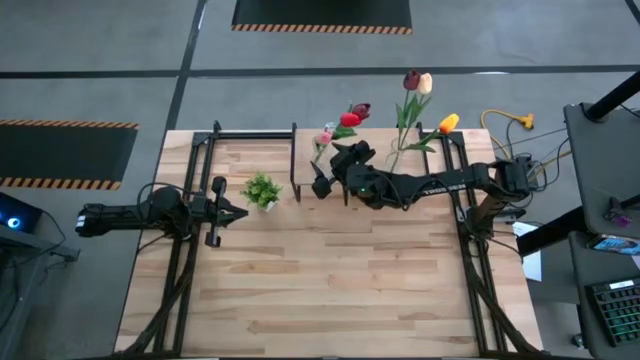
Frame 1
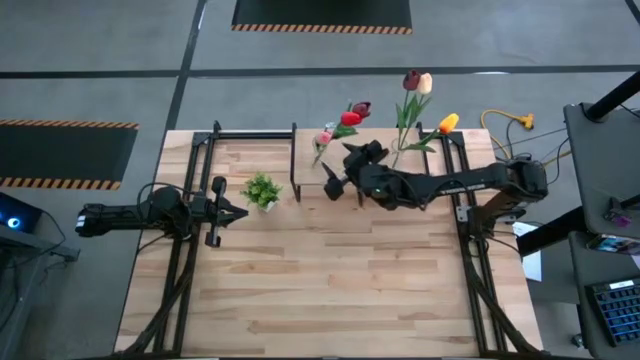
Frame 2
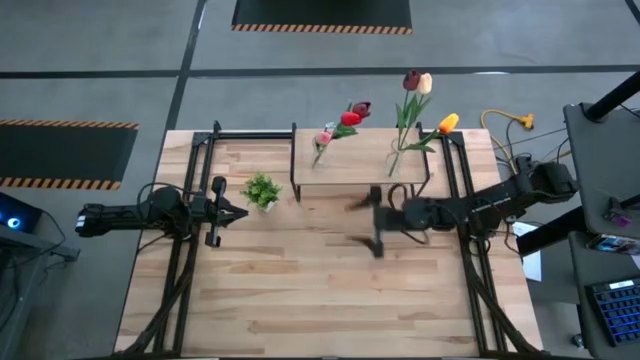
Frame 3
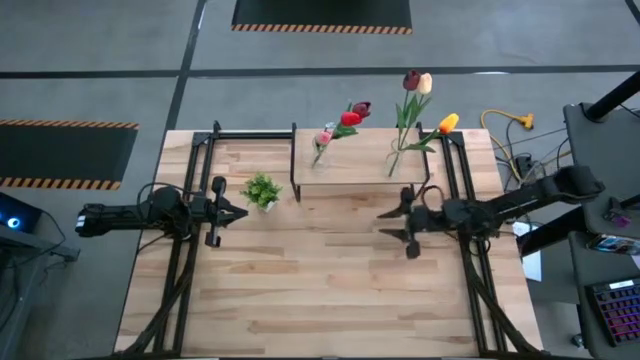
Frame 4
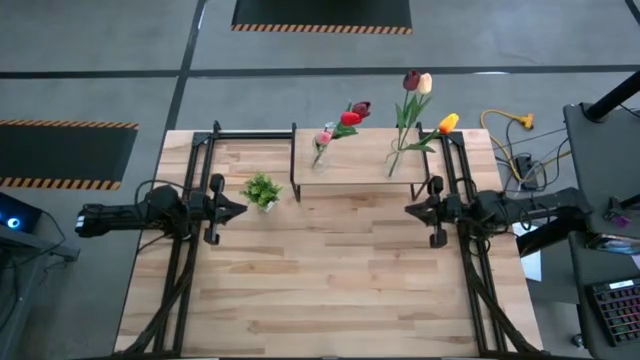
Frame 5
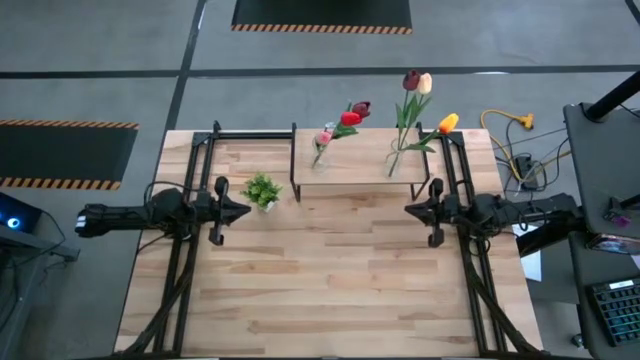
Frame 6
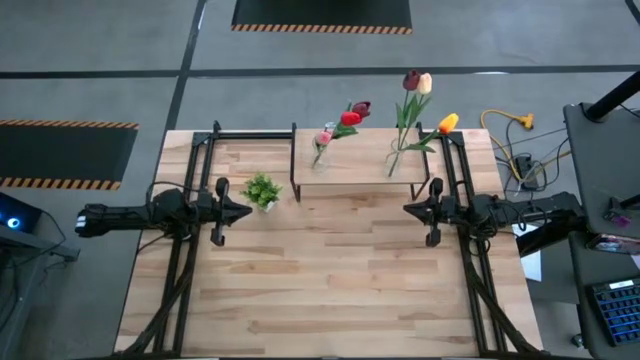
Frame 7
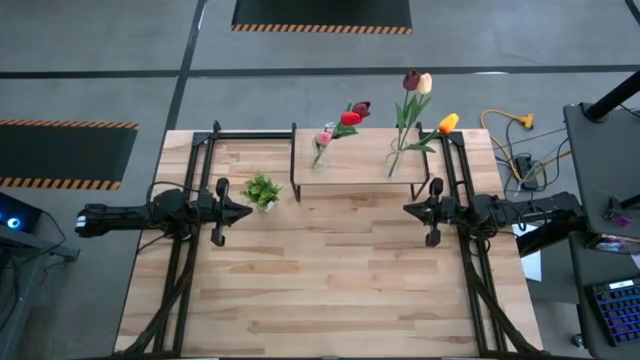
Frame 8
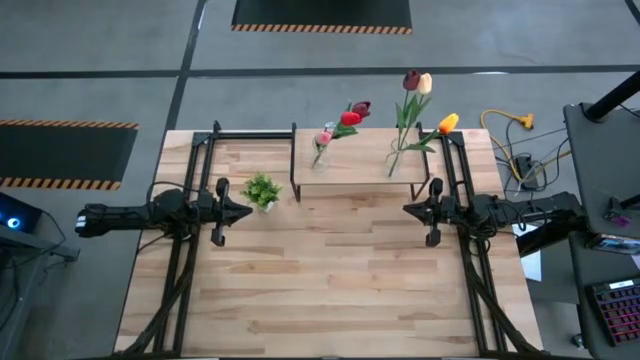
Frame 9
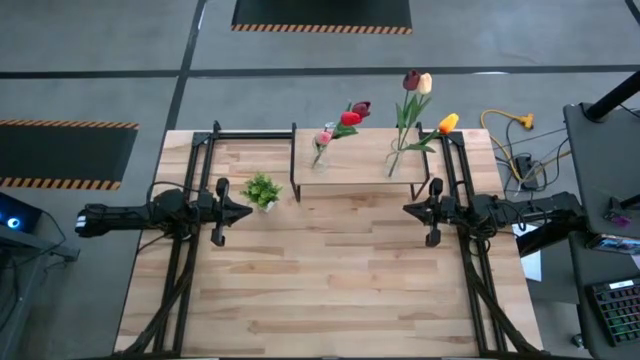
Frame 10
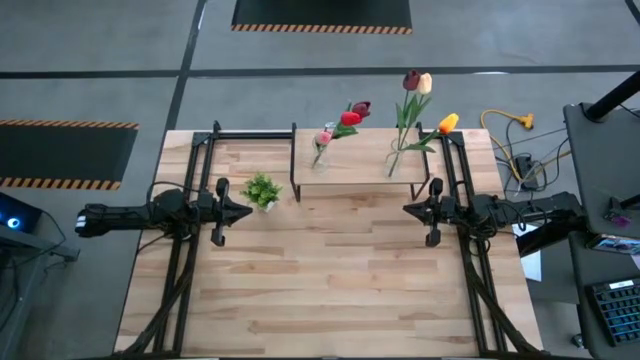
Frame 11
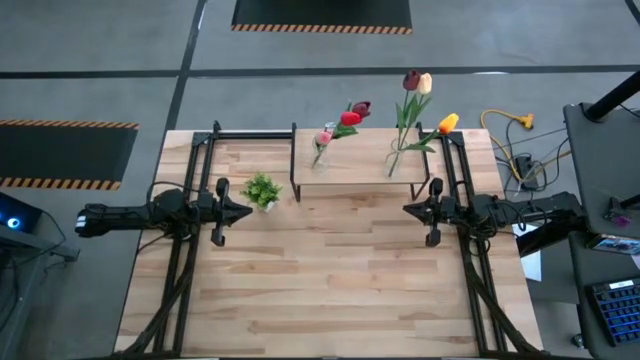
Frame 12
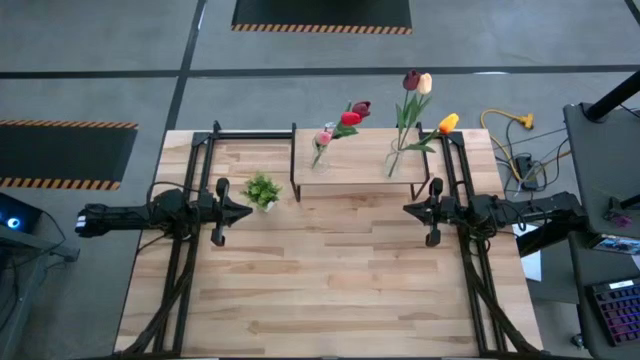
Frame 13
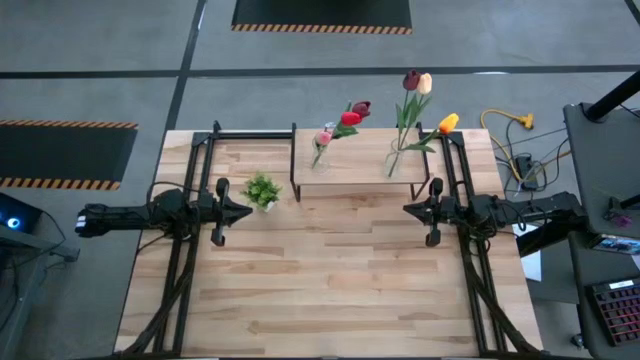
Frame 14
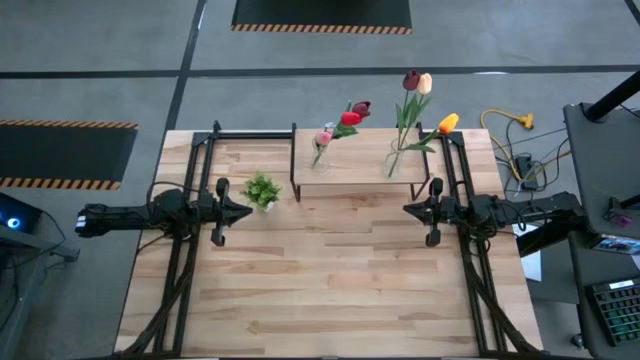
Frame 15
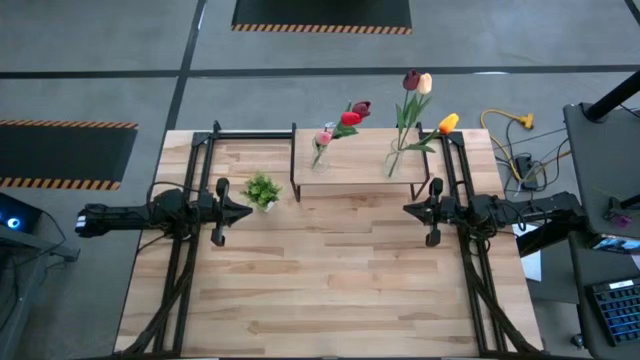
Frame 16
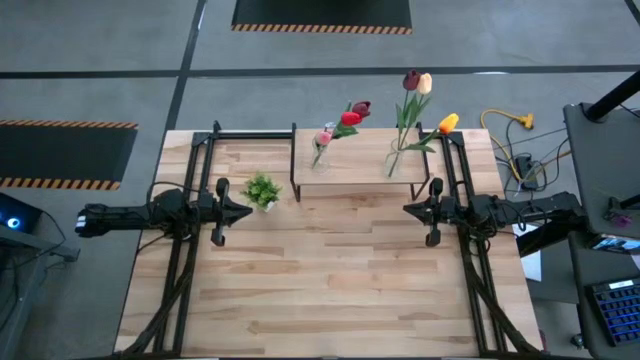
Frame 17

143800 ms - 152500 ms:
Task: Pick and place flowers into a vace then onto a shelf
Return to Home Position

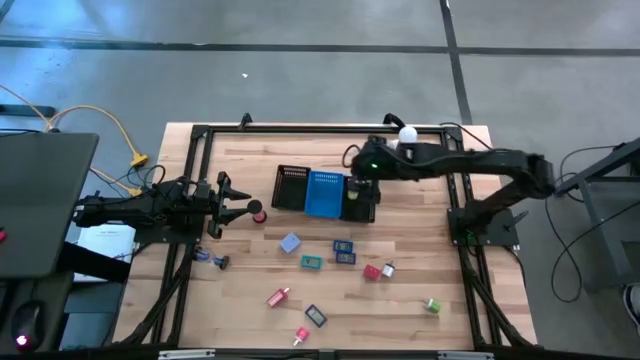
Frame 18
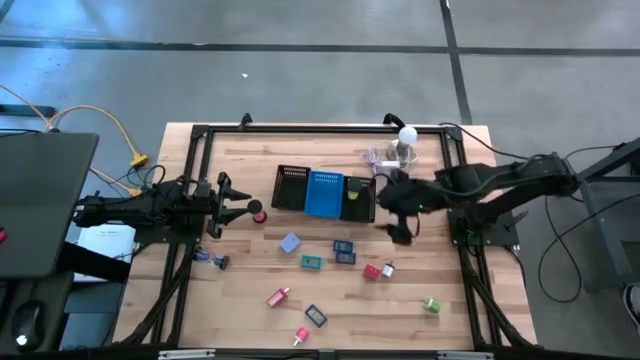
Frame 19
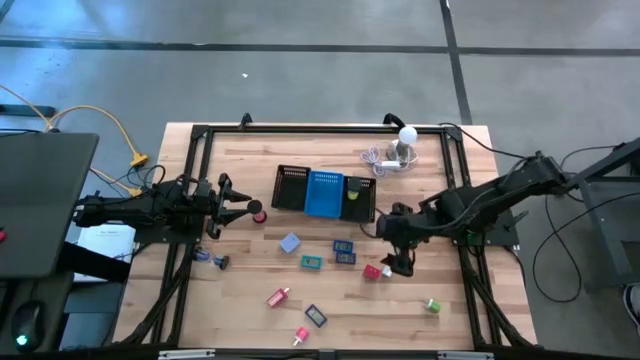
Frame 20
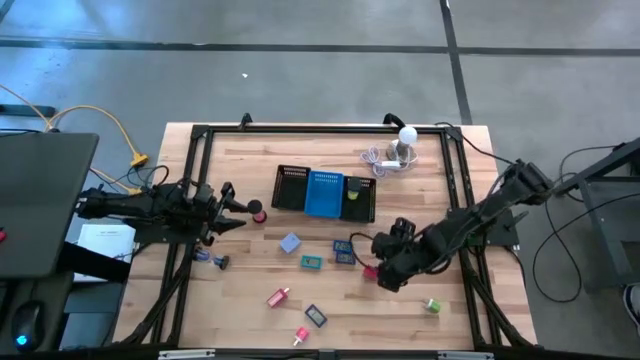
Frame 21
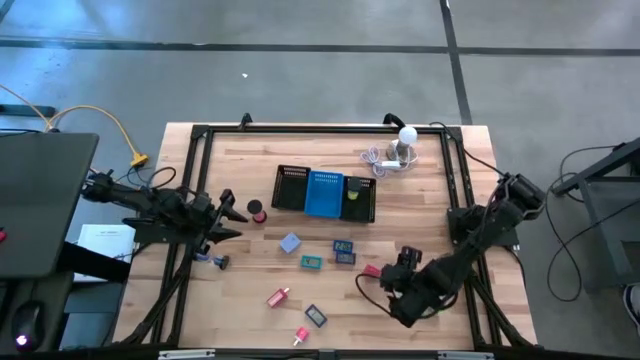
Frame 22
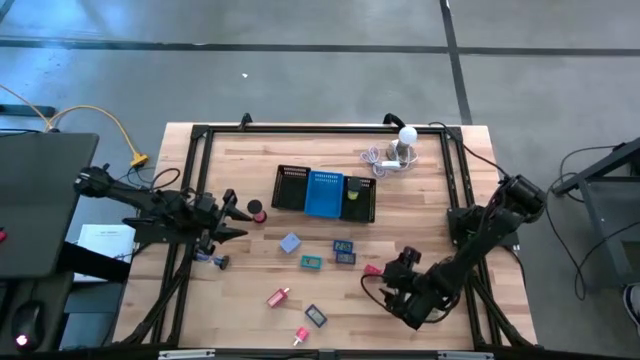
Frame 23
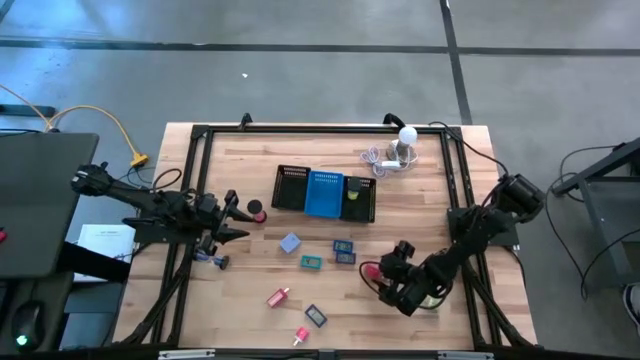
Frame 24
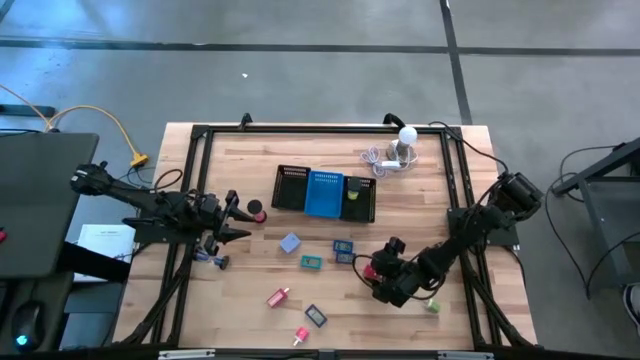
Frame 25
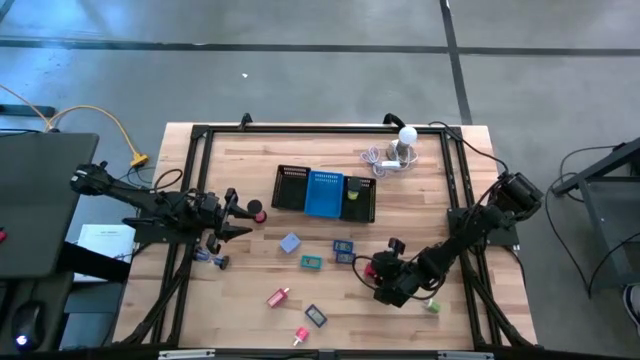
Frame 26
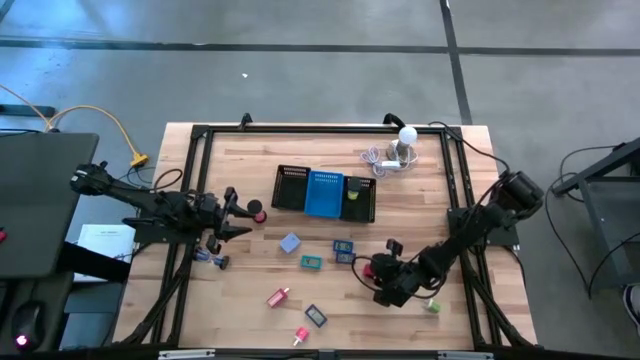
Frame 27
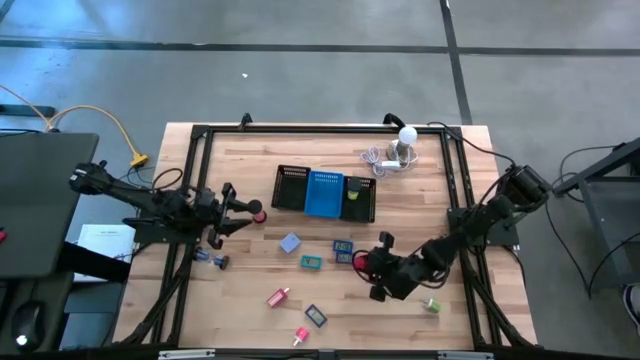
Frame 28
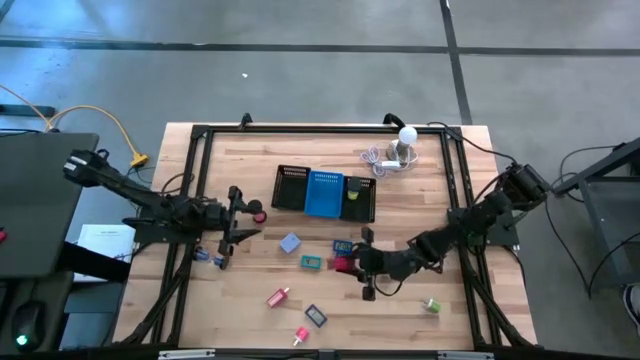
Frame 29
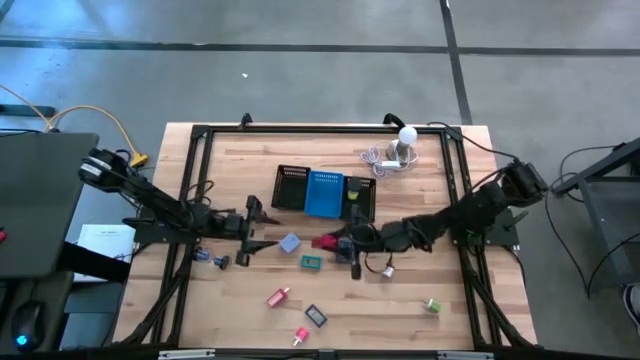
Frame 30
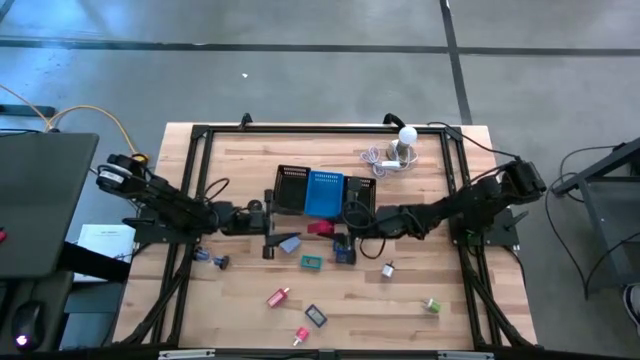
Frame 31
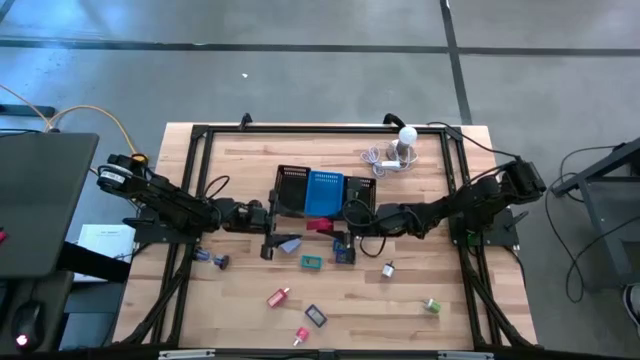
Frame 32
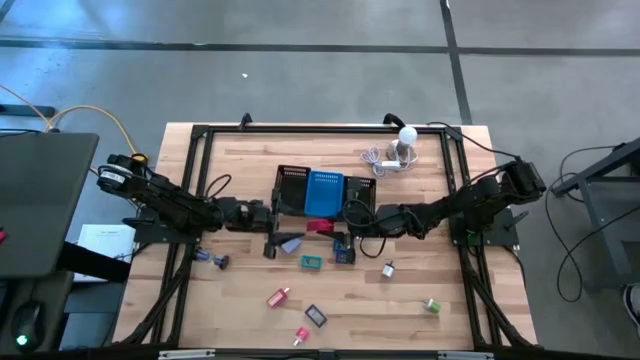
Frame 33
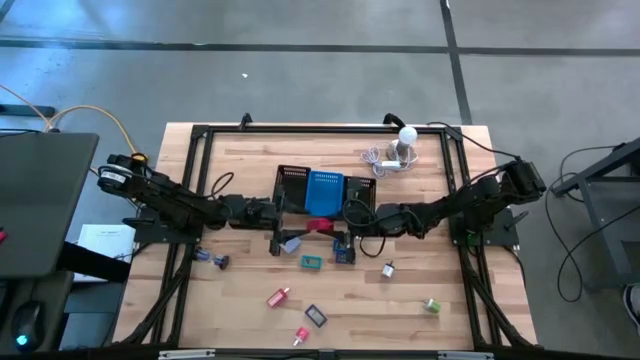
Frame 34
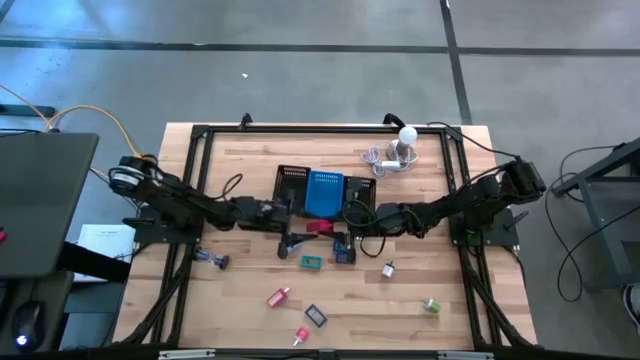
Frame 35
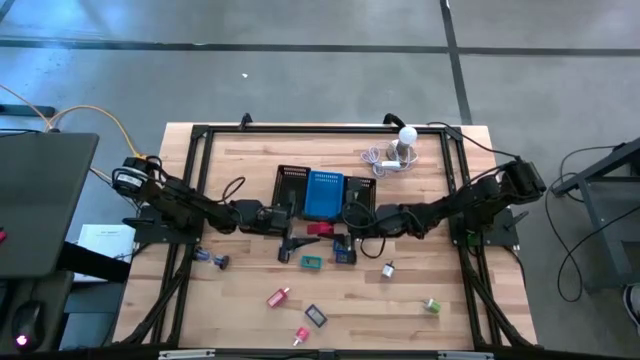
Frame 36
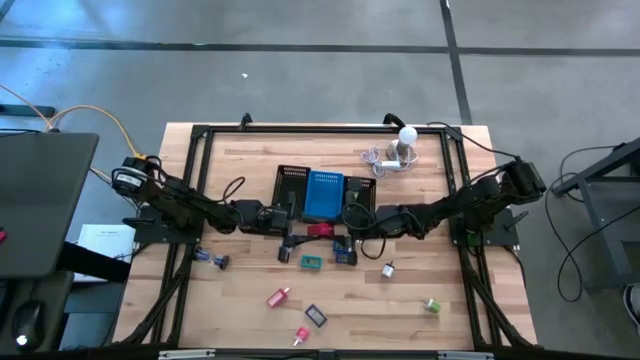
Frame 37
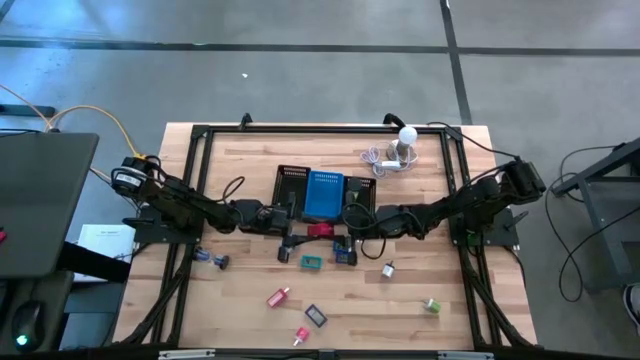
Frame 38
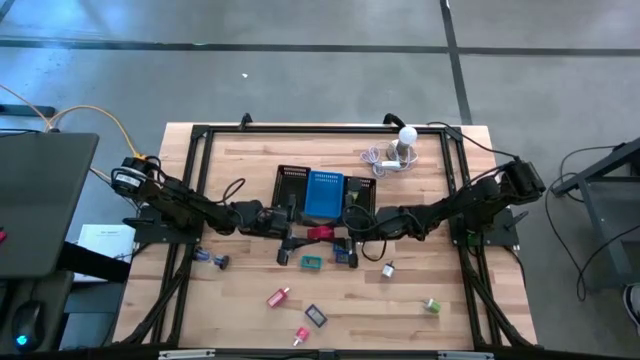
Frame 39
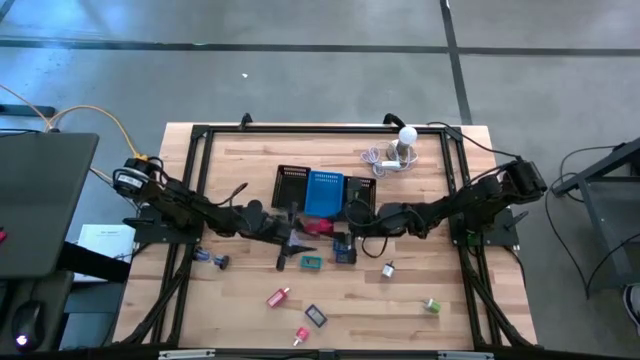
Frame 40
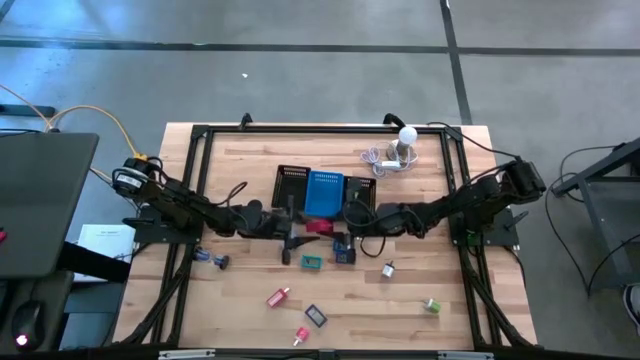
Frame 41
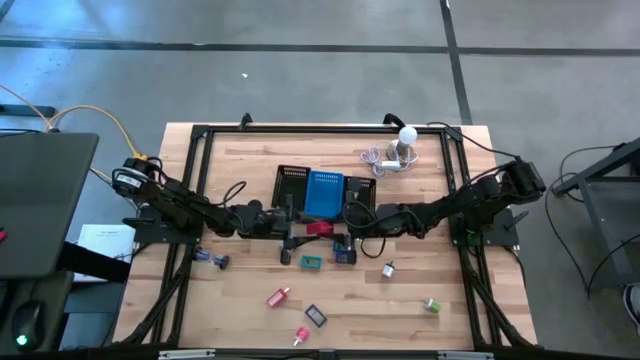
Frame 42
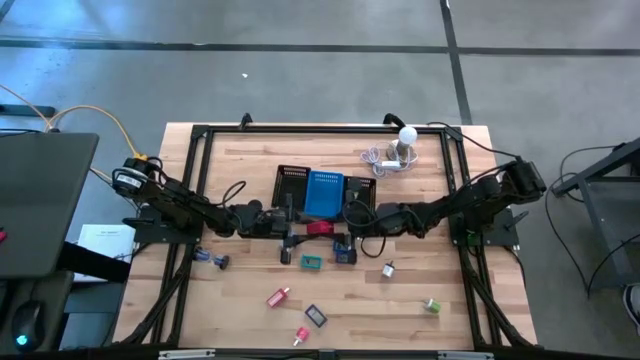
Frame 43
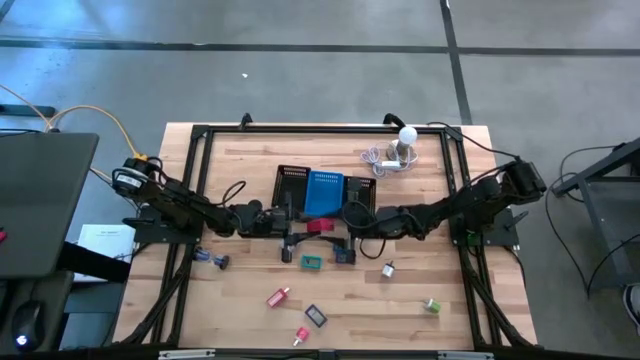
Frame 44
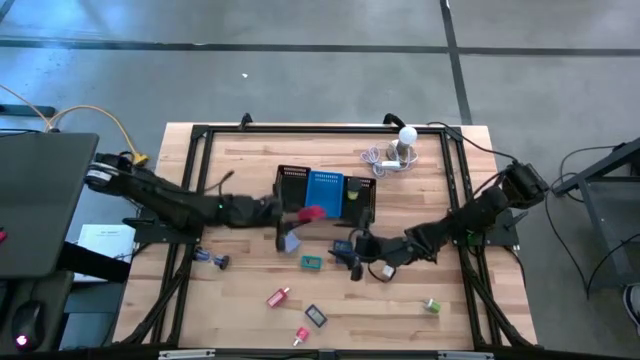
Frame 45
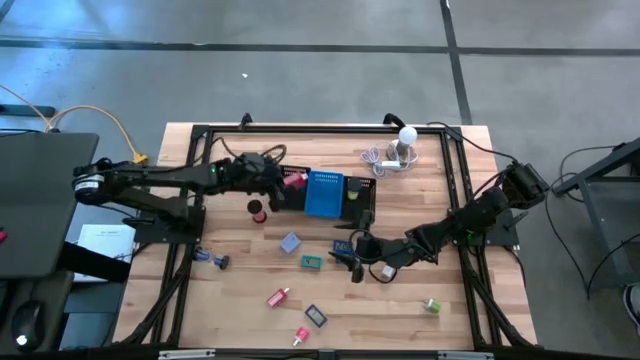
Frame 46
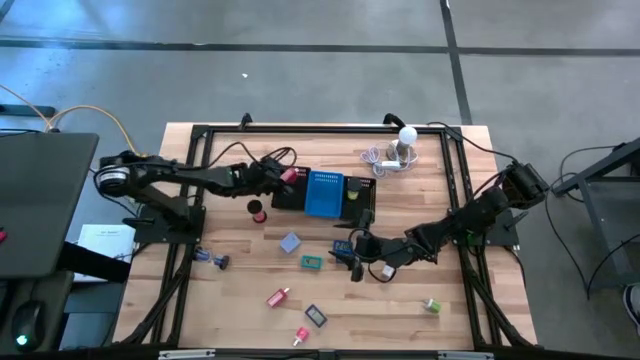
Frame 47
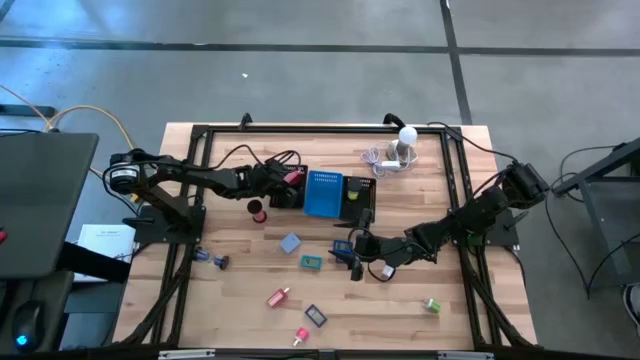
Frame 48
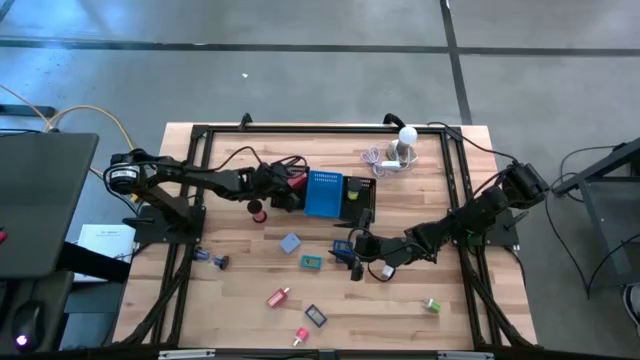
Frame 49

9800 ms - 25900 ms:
Task: Pick & Place Office items
Put the right red charger adapter into the left black bin
